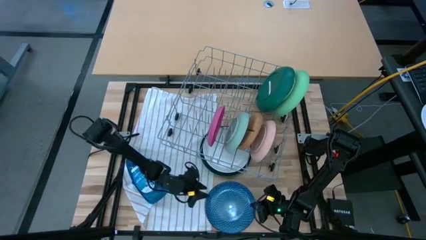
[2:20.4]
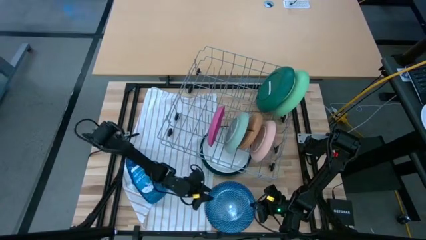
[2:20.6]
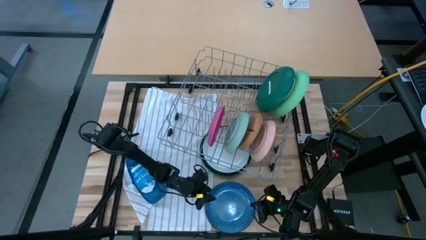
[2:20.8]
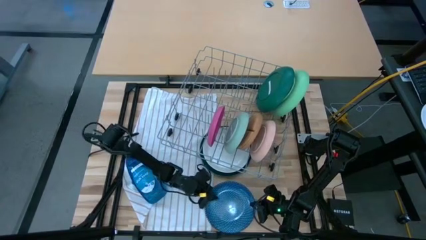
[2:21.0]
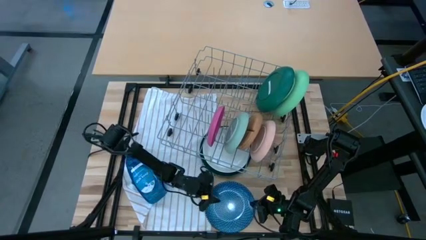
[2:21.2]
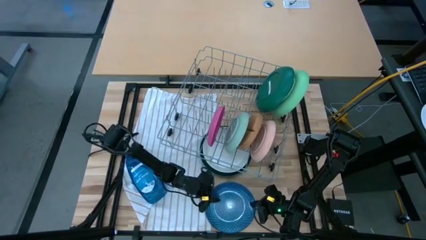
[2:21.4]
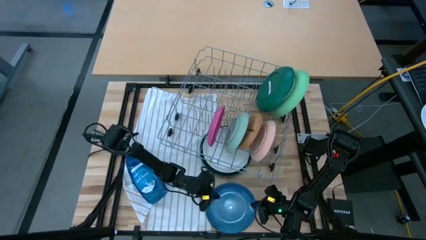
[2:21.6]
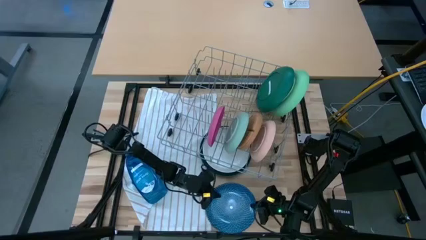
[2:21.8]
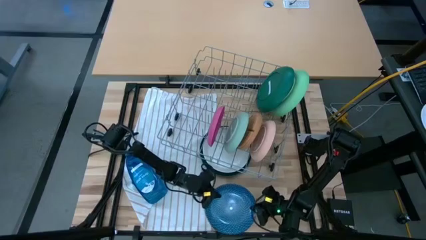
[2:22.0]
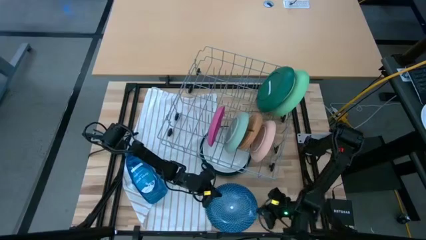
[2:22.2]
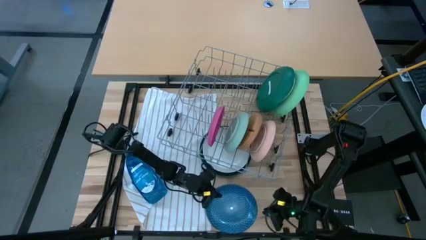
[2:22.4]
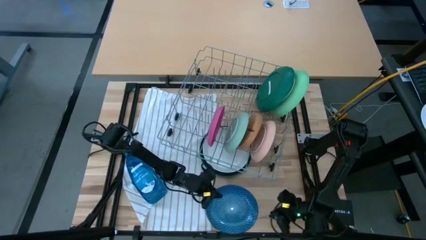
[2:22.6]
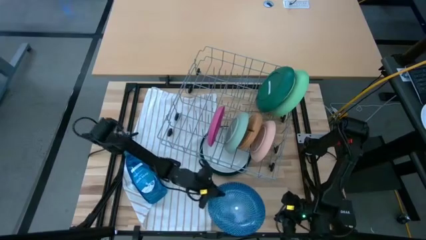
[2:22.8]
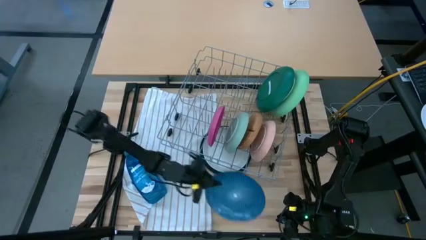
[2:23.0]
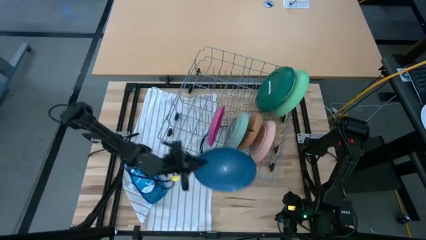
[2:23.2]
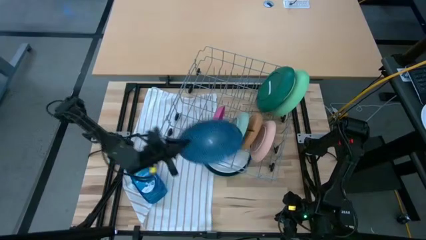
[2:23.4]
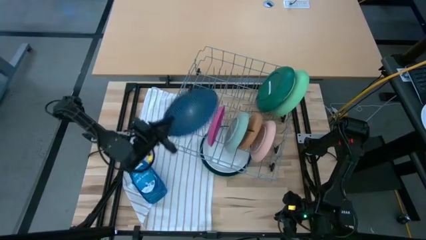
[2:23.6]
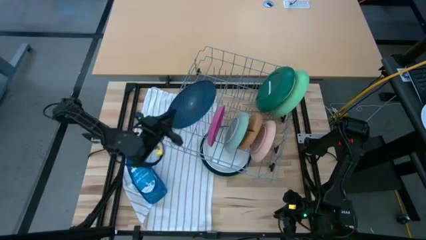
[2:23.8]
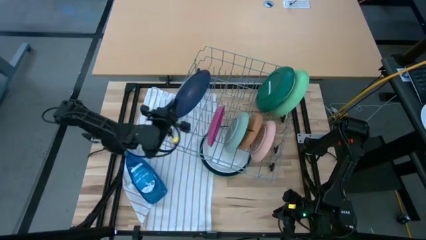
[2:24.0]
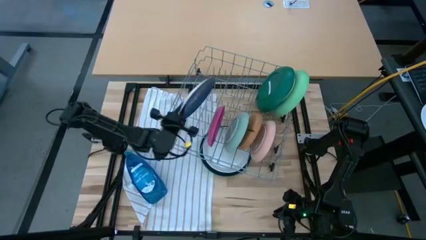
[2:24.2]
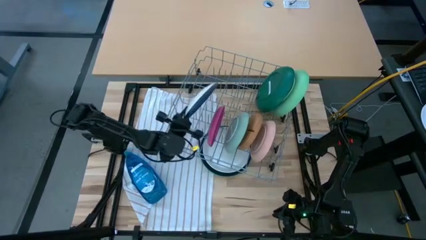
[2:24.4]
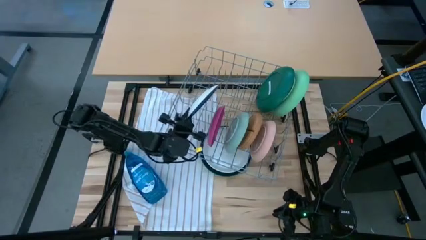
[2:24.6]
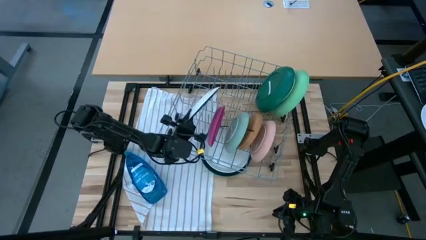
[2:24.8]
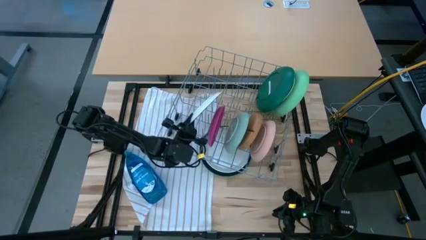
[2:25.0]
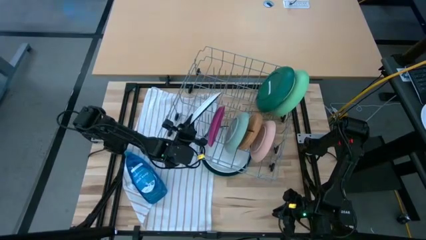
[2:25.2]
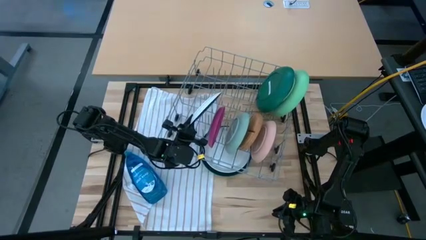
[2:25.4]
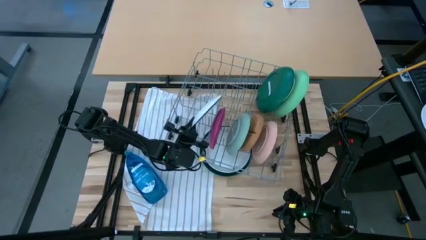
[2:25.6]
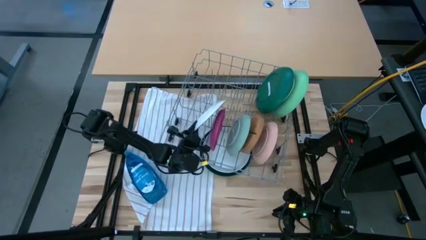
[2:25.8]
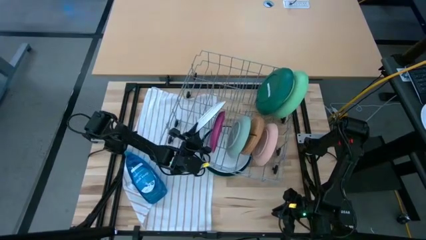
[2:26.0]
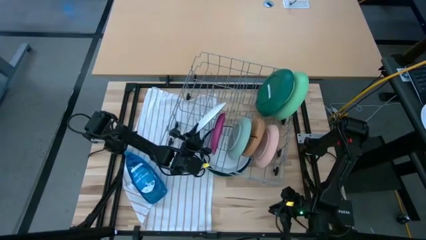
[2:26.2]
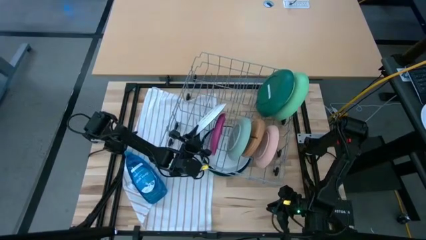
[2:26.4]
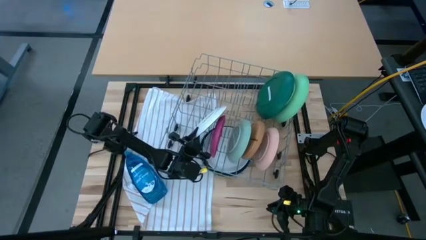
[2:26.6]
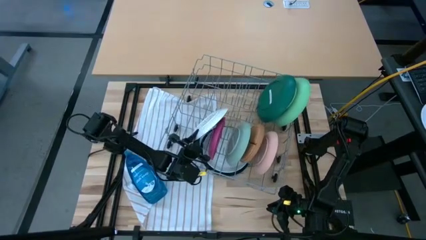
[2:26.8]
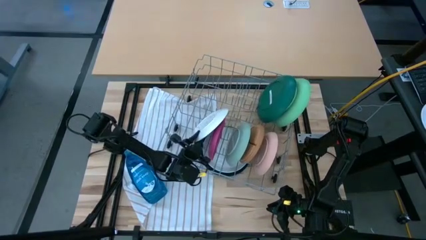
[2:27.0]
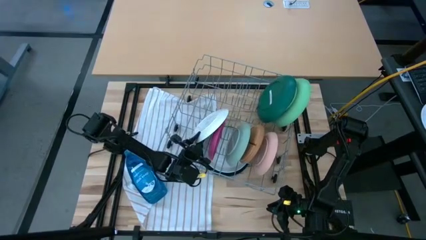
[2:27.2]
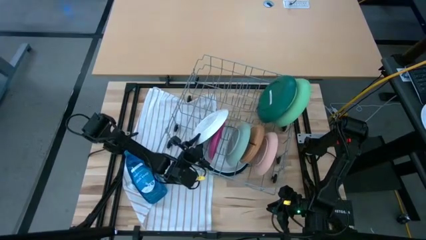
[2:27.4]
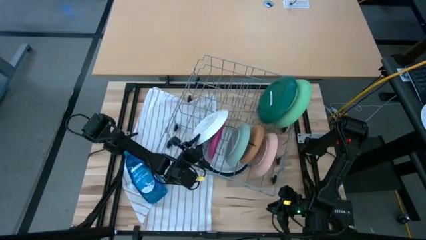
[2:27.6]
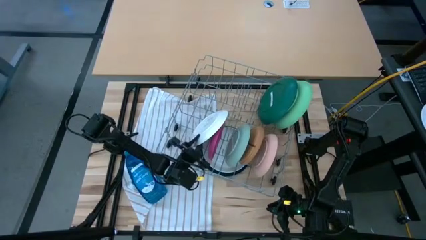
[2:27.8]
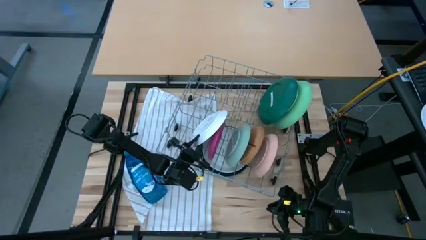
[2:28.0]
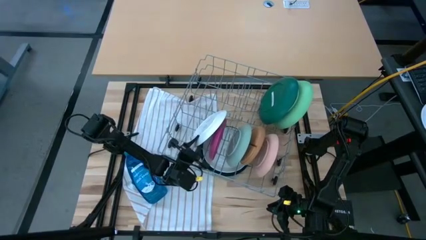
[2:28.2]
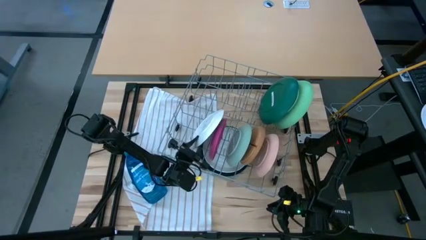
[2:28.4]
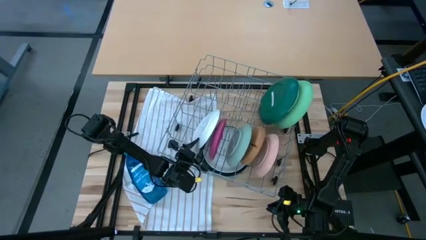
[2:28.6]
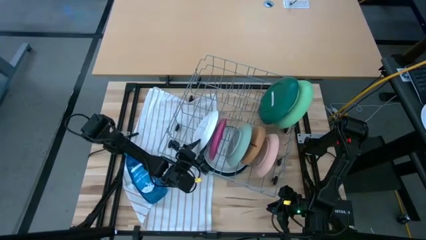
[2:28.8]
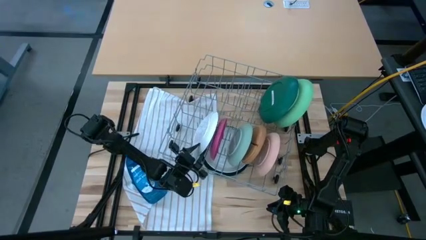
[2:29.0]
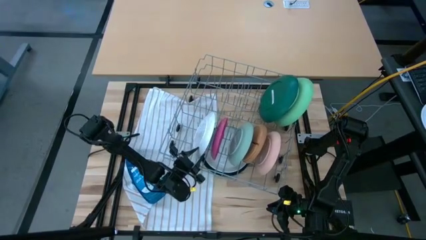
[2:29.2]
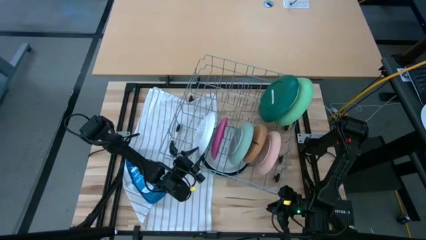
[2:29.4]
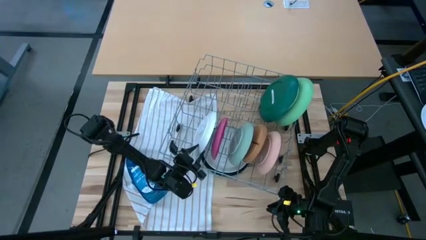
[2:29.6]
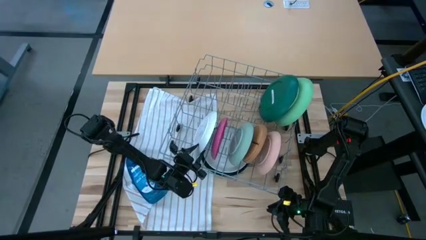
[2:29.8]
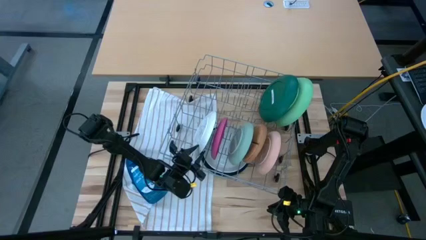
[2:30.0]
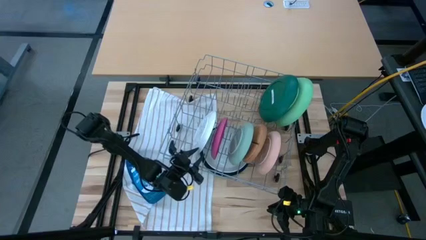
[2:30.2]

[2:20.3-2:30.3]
Task: Sort dishes
Put the blue plate in the dish rack

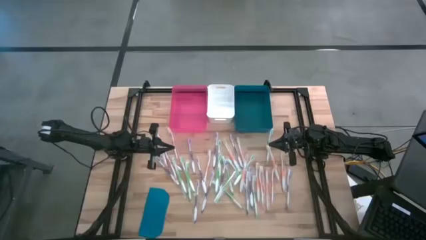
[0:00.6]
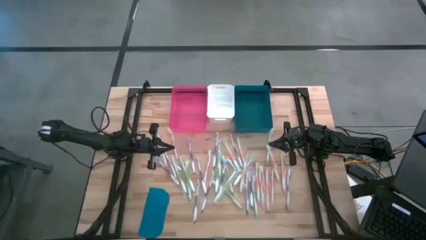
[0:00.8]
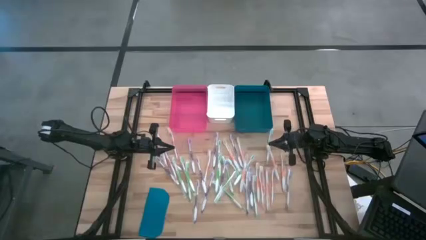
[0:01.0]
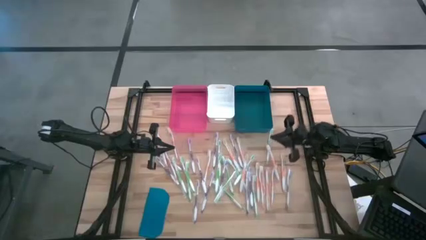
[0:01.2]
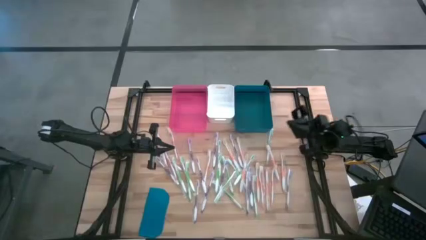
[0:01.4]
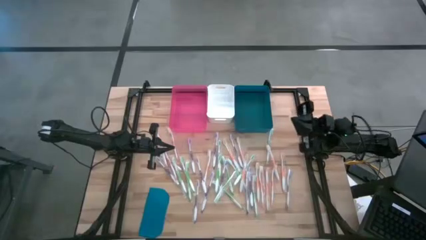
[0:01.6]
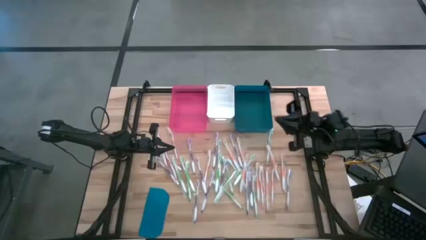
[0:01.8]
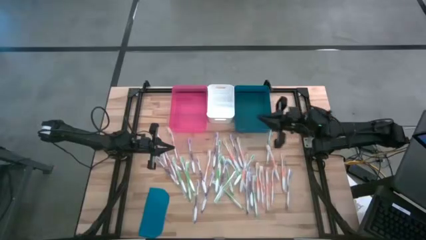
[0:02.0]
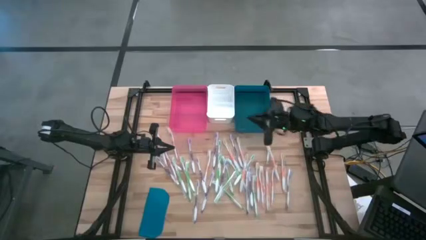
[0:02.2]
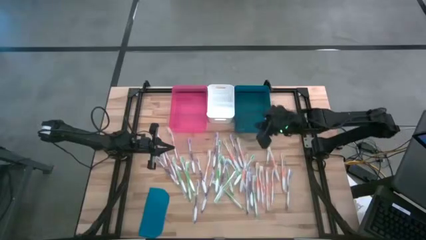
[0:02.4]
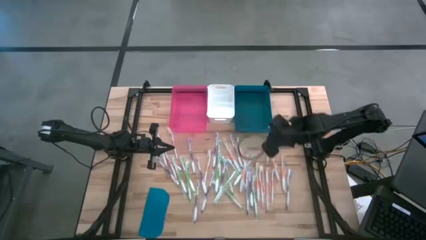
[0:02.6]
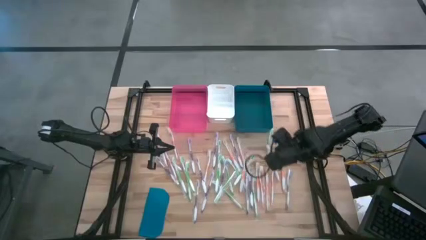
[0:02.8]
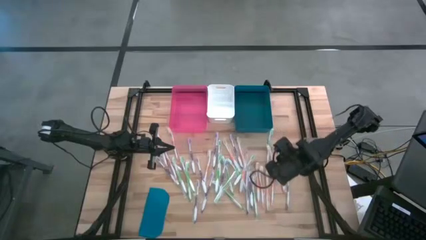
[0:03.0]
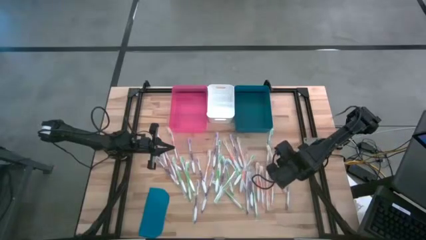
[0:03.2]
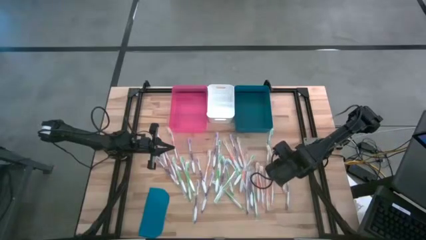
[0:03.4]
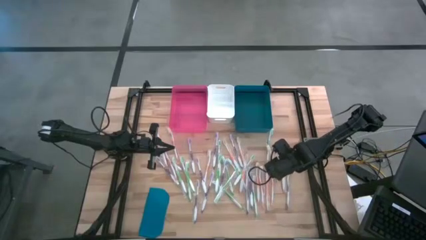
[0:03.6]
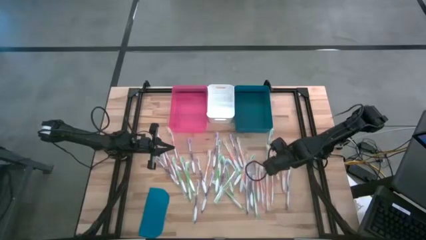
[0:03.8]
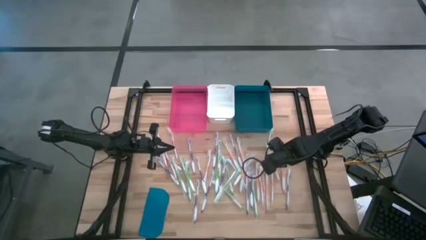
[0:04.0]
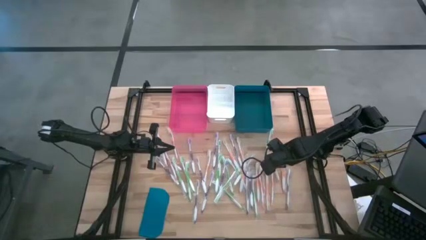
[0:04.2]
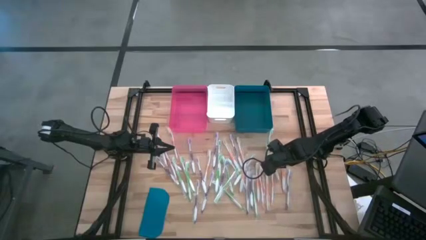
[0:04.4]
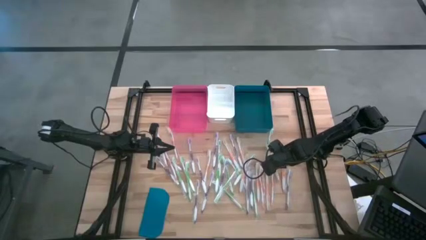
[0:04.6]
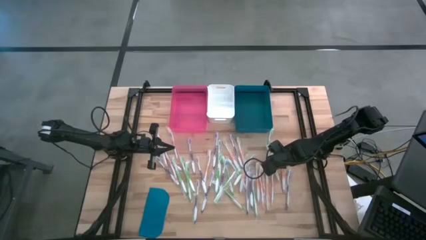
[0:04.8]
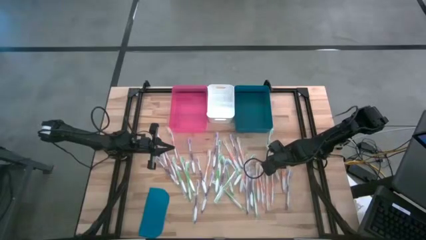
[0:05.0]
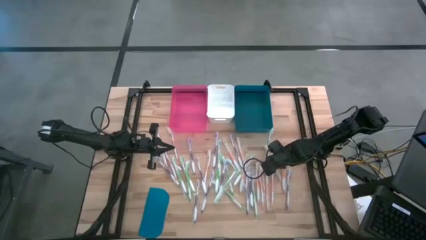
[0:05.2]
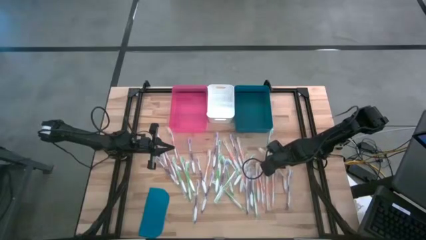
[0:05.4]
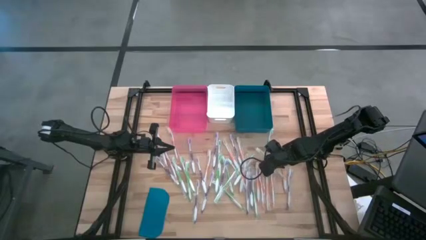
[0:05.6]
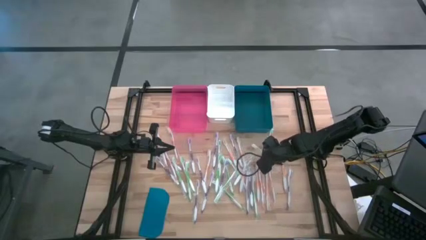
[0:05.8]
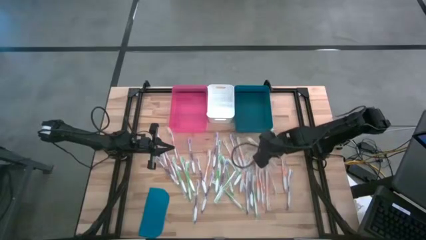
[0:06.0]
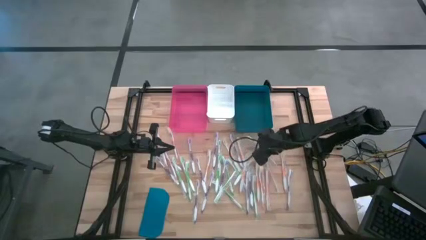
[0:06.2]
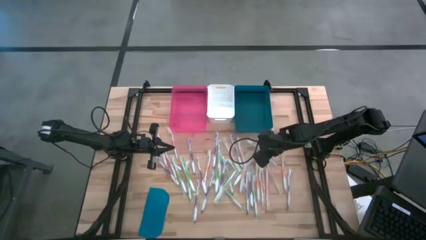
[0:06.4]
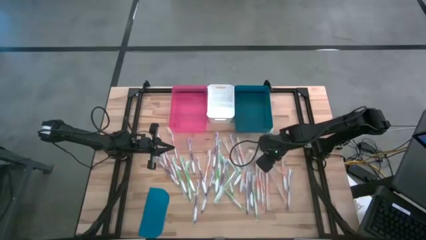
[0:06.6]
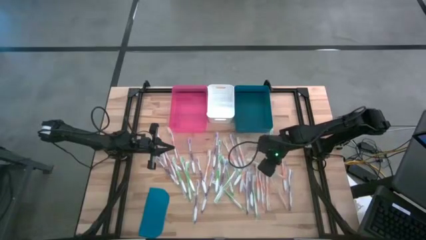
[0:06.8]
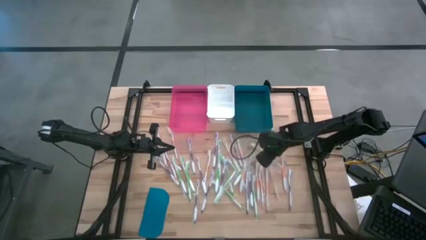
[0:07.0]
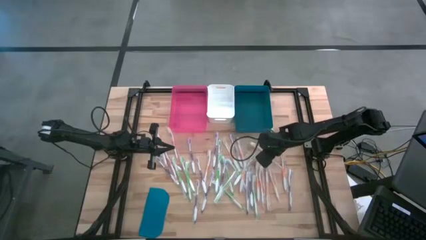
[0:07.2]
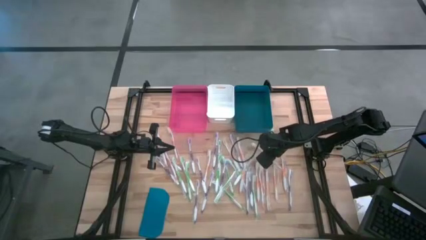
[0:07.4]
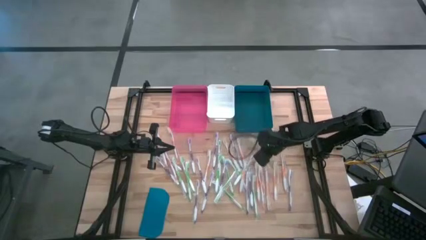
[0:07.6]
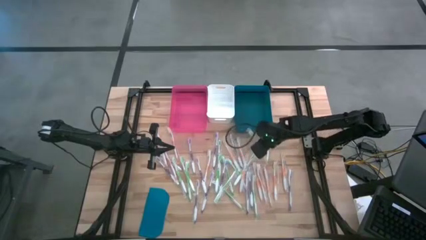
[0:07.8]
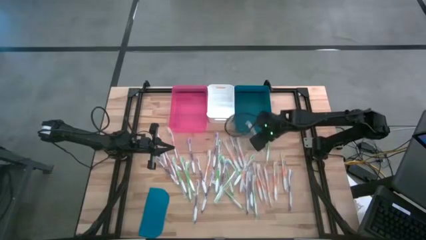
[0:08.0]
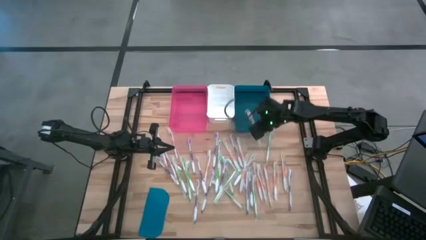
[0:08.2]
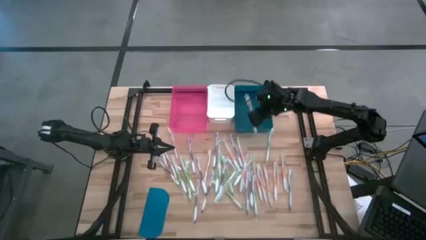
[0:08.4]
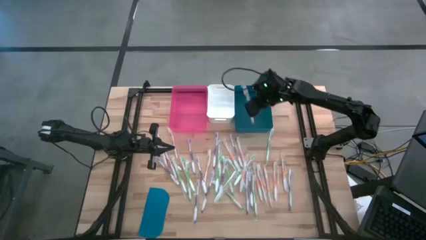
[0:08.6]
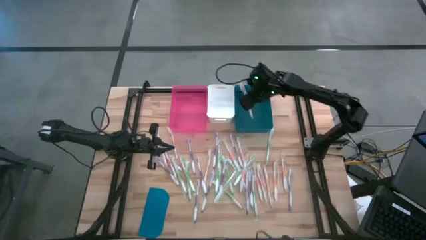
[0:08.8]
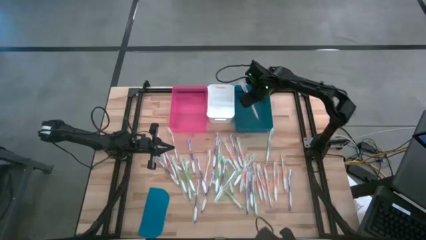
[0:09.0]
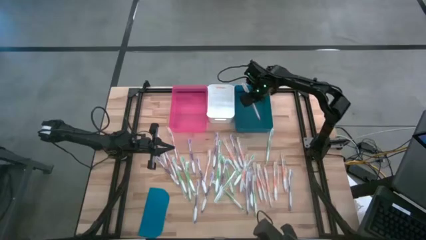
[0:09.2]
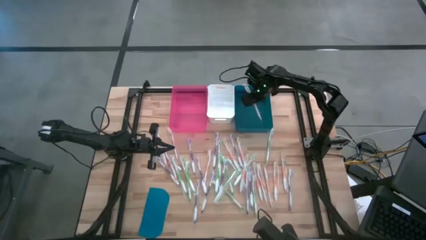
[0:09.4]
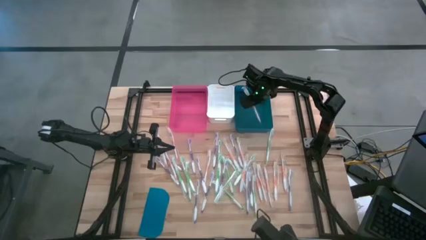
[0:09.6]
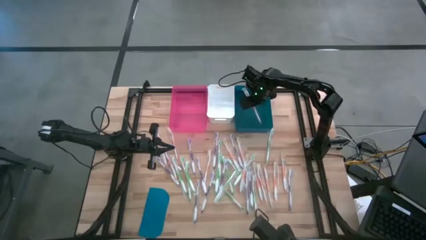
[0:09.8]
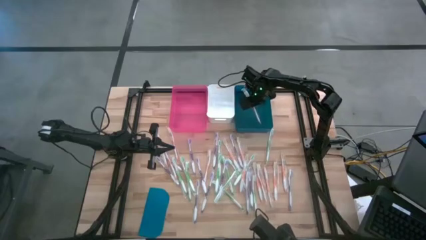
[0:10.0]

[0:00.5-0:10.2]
Task: Pick & Place Toothbrushes
Put the orange toothbrush into the blue bin
